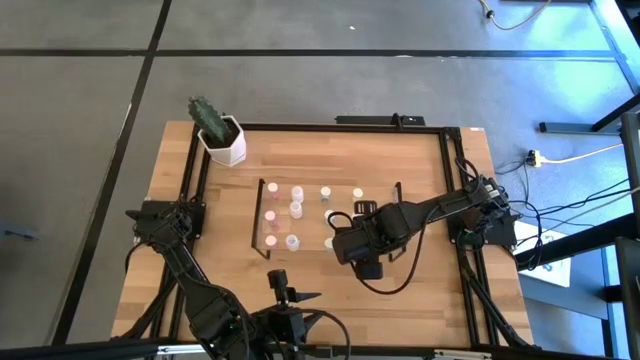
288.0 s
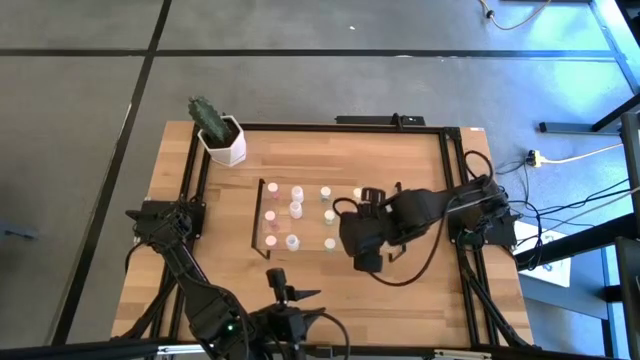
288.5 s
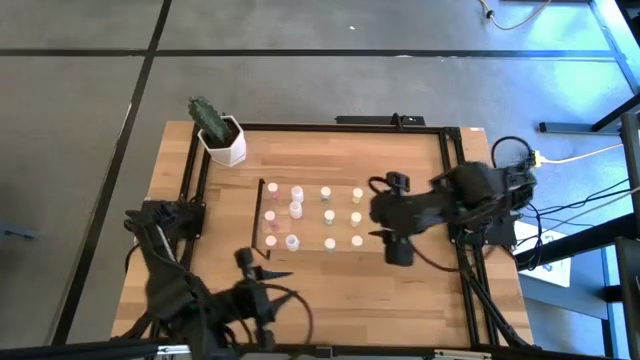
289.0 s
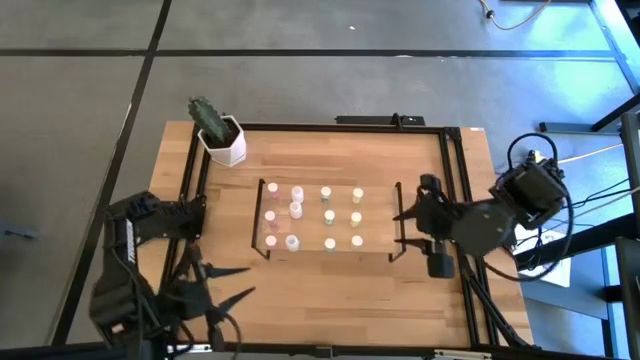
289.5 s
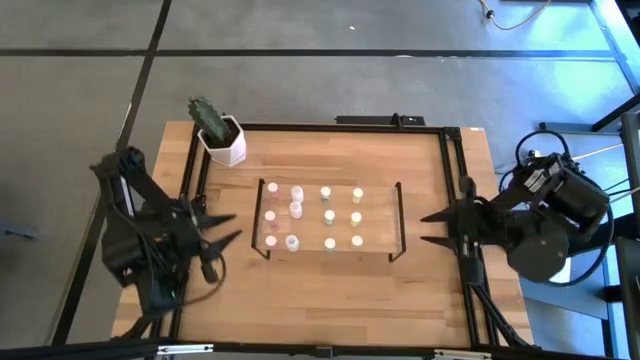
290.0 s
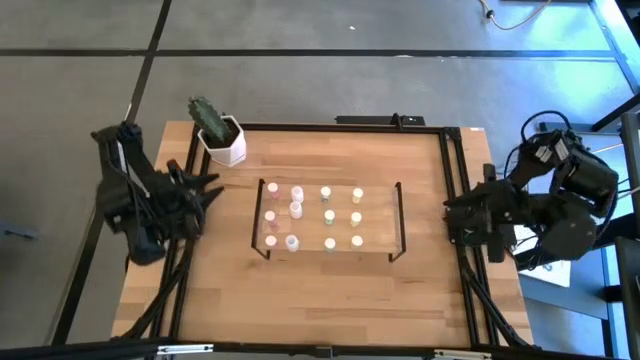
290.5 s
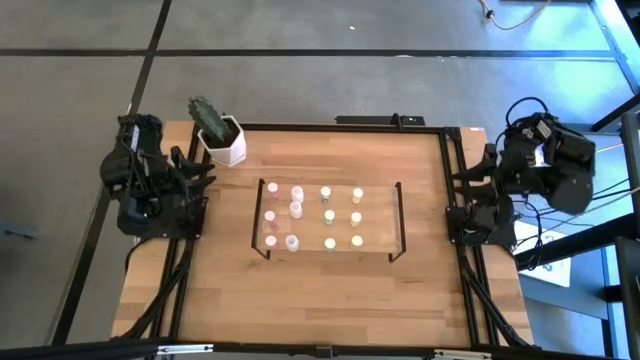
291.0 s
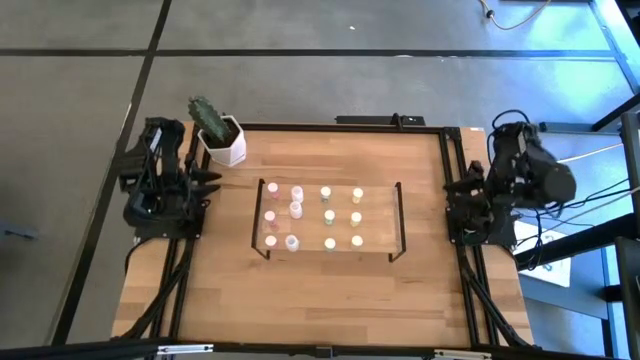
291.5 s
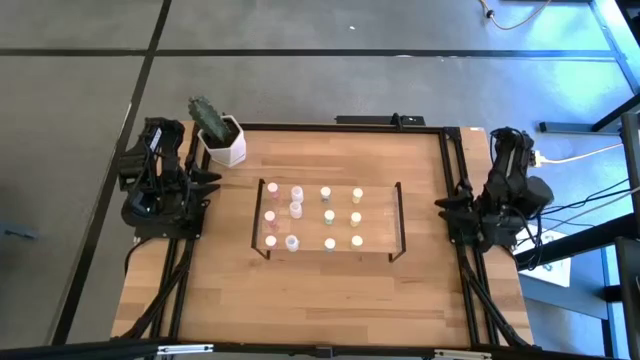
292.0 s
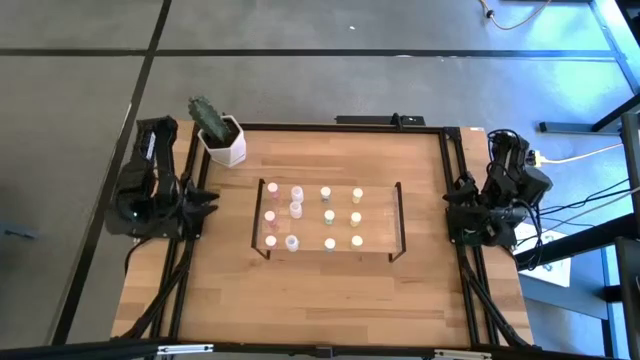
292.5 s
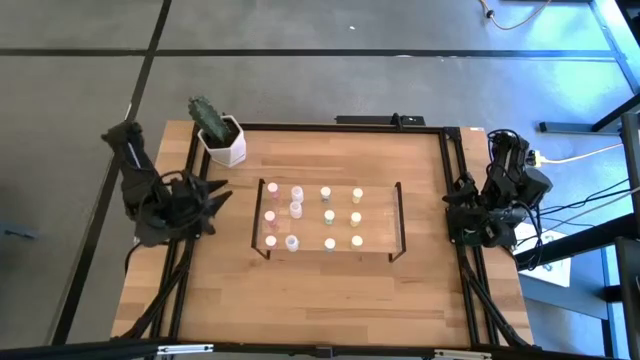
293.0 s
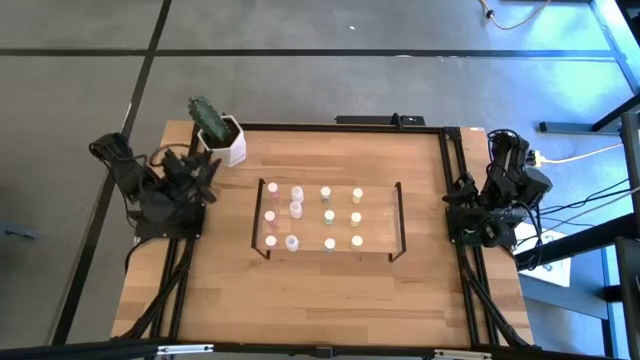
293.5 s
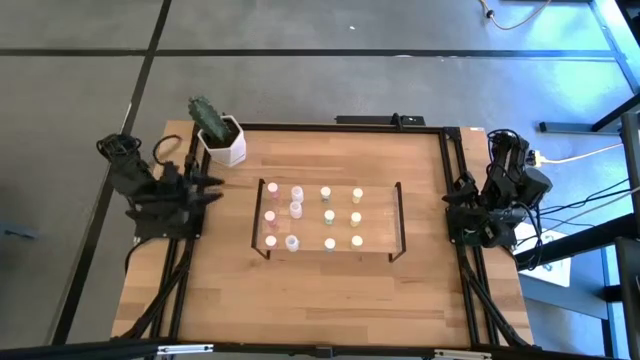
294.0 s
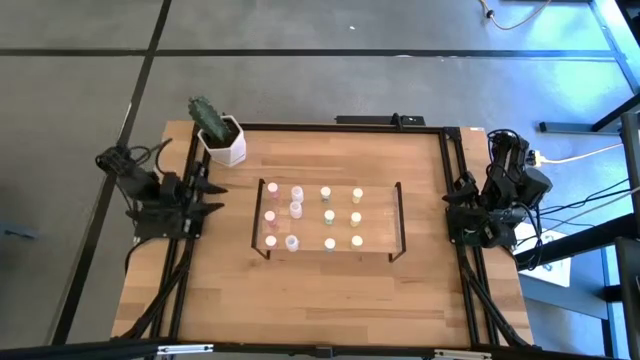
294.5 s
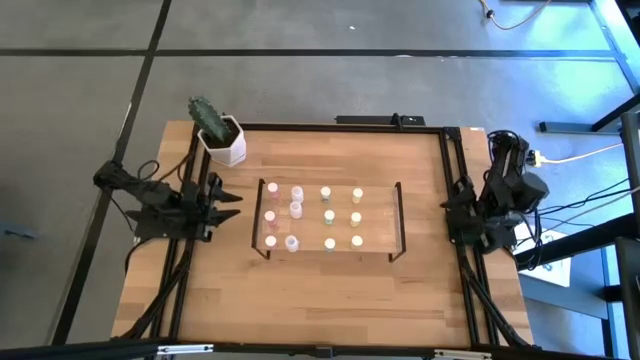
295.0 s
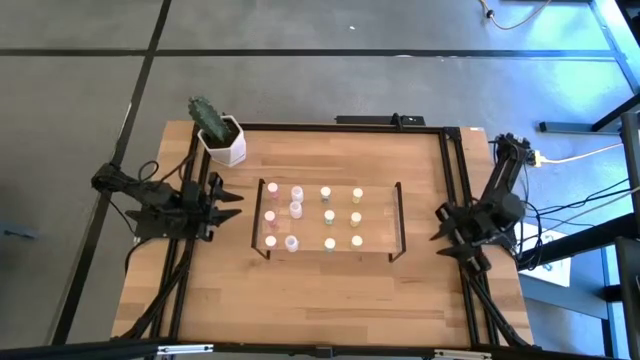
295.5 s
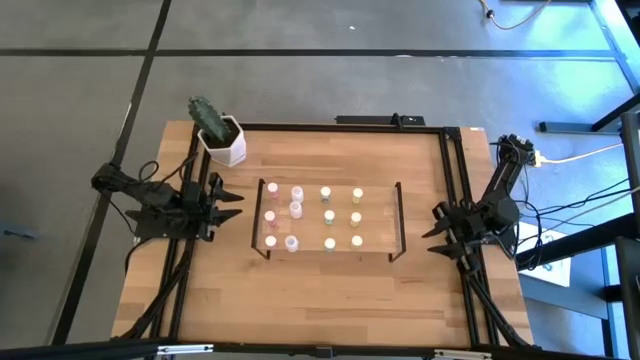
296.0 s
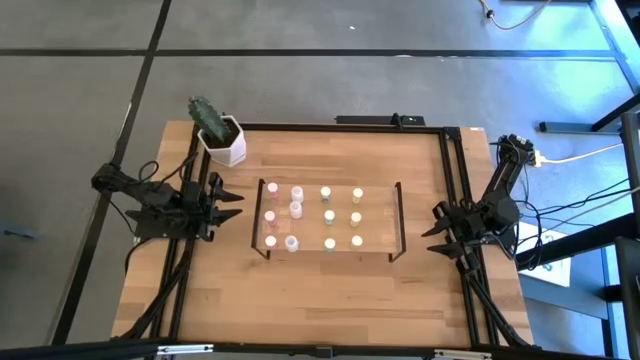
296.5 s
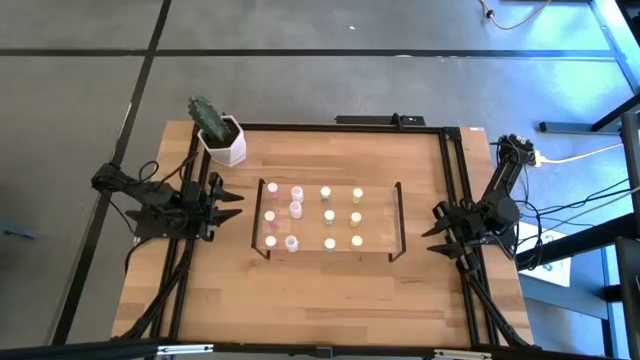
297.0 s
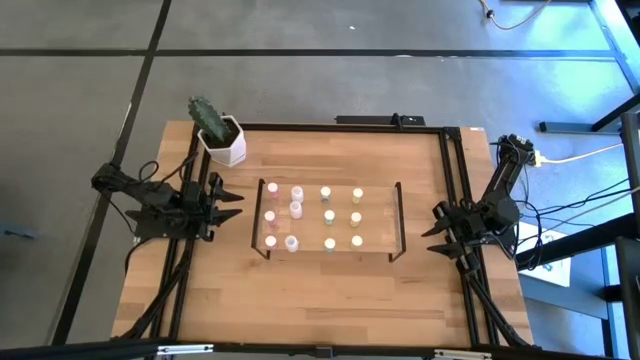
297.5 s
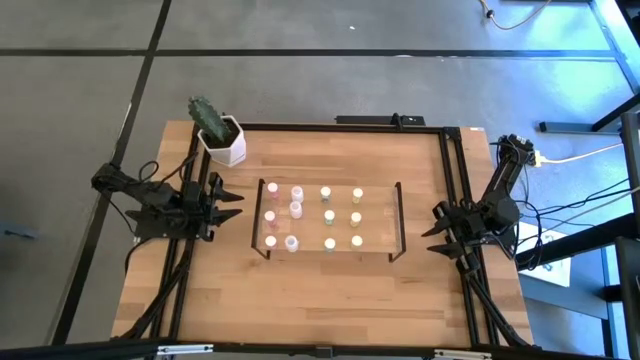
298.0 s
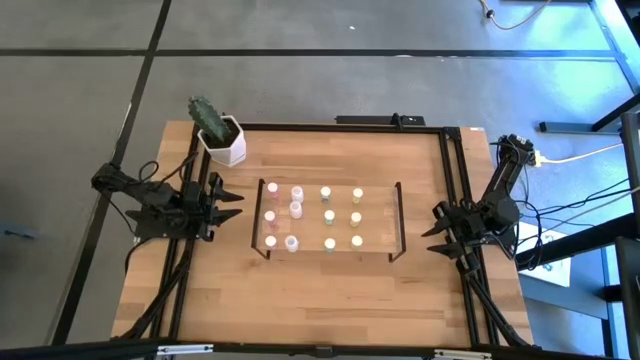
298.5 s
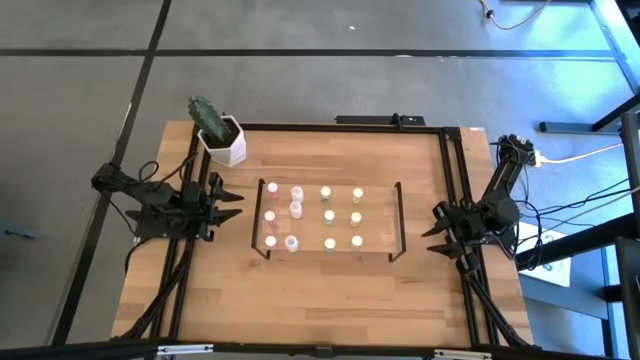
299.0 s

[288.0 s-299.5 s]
Task: Pick and place medicine bottles onto shelf by color
Return to Home Position

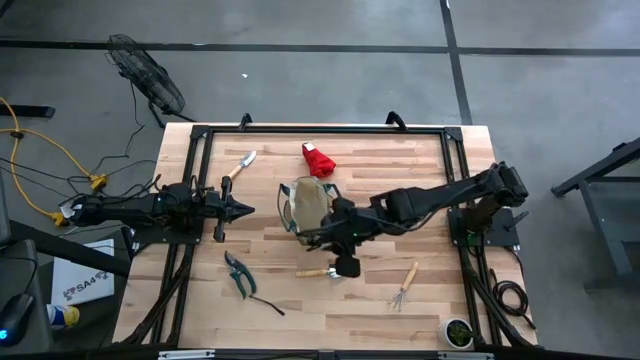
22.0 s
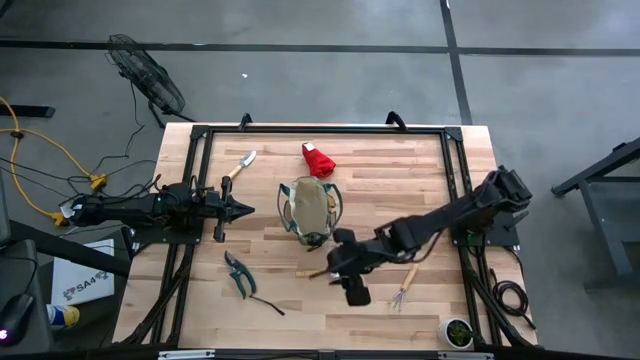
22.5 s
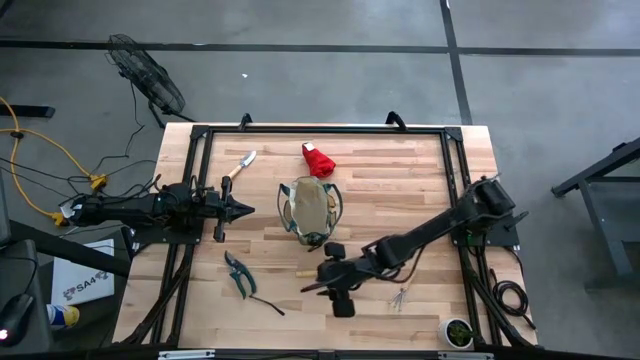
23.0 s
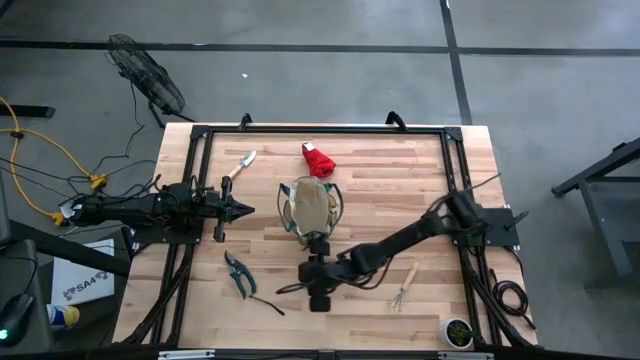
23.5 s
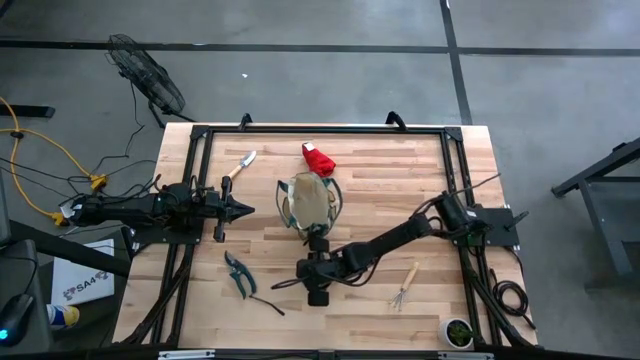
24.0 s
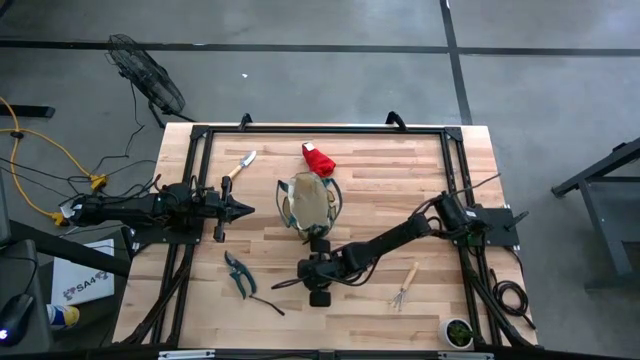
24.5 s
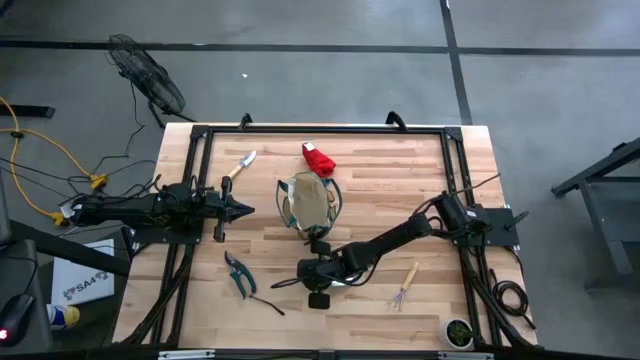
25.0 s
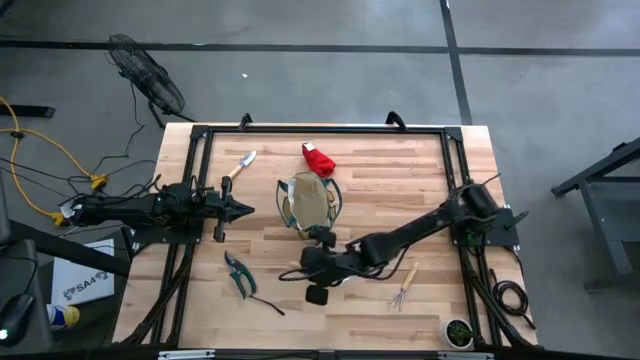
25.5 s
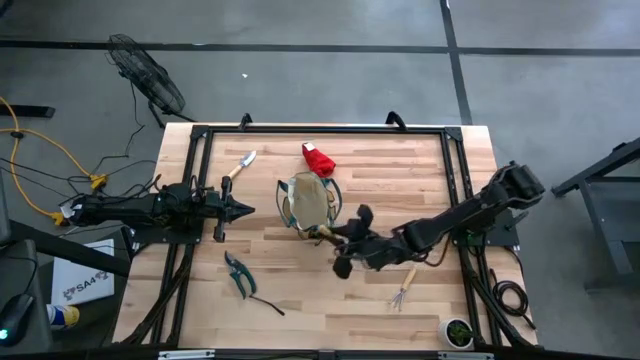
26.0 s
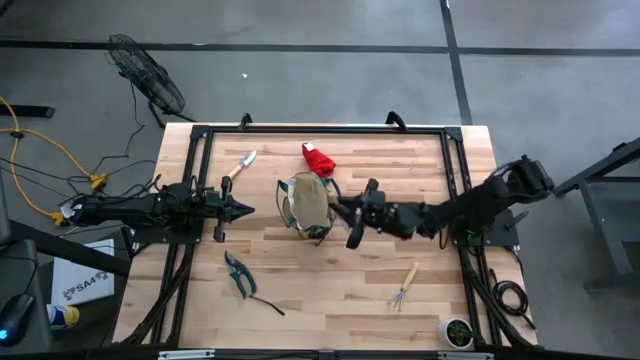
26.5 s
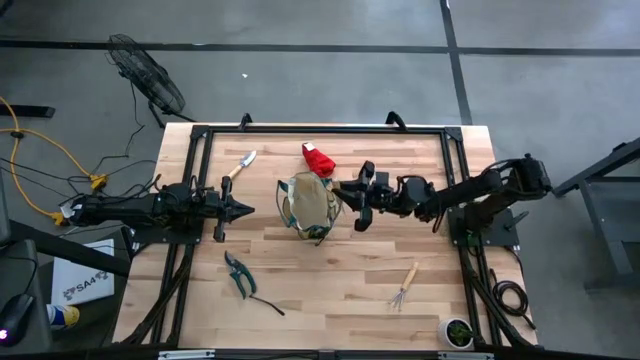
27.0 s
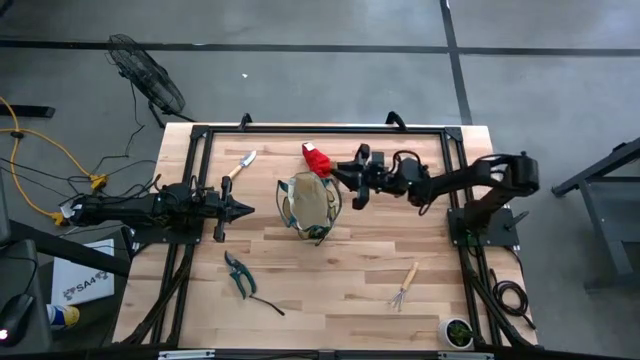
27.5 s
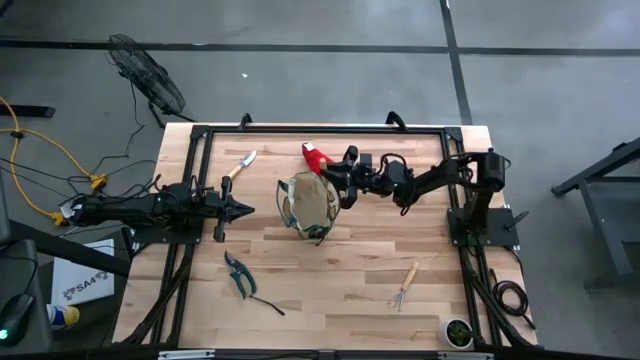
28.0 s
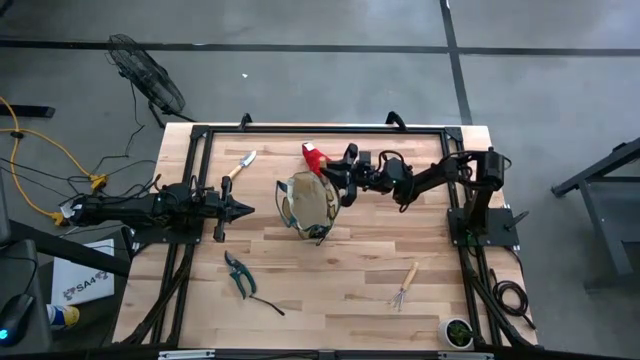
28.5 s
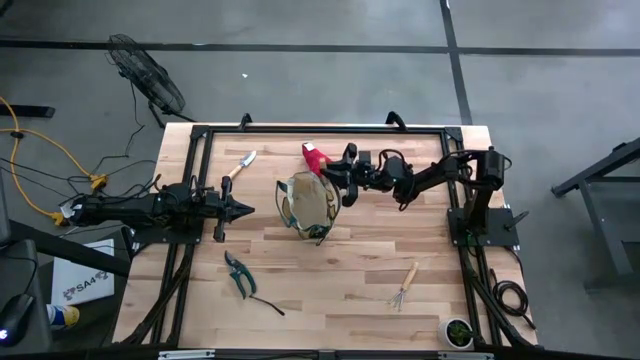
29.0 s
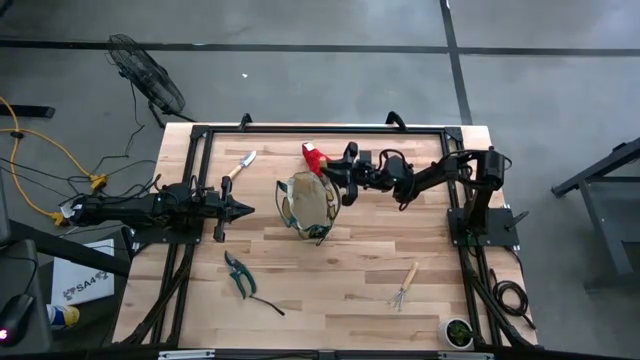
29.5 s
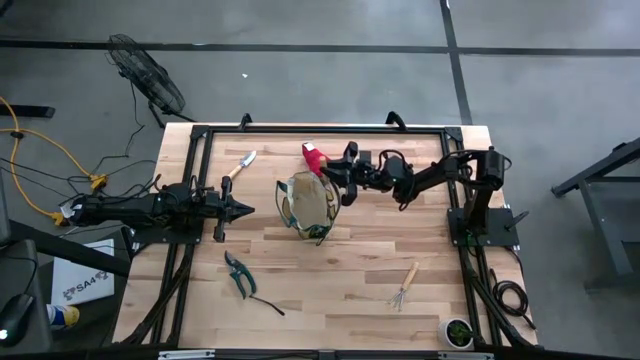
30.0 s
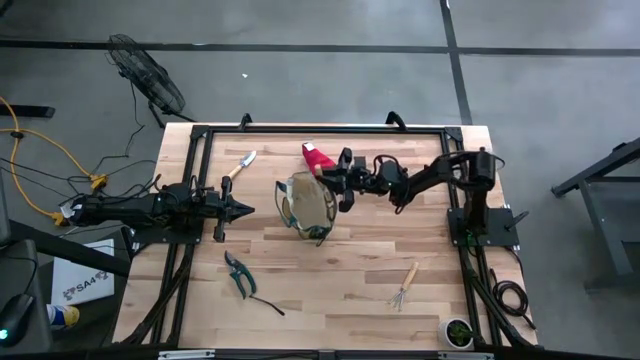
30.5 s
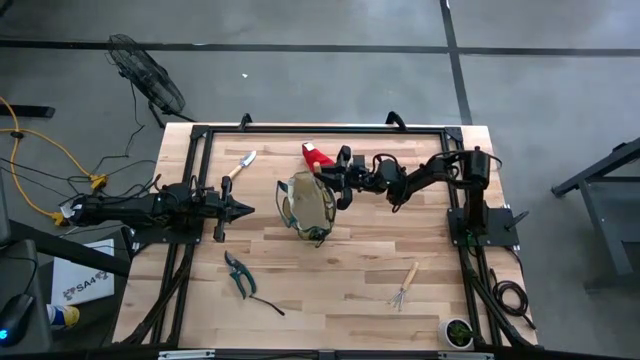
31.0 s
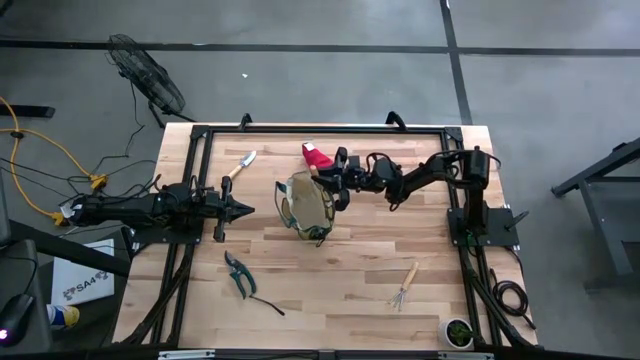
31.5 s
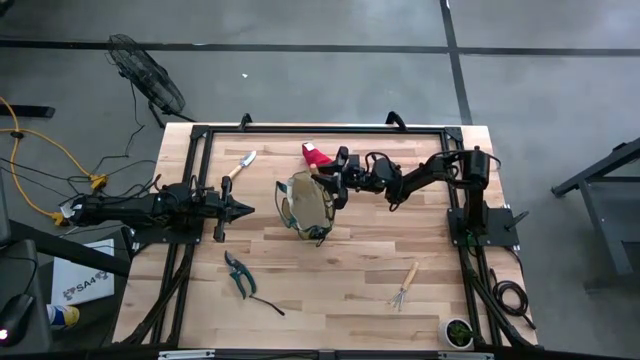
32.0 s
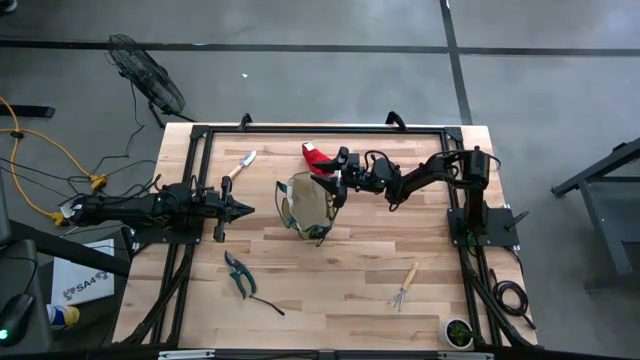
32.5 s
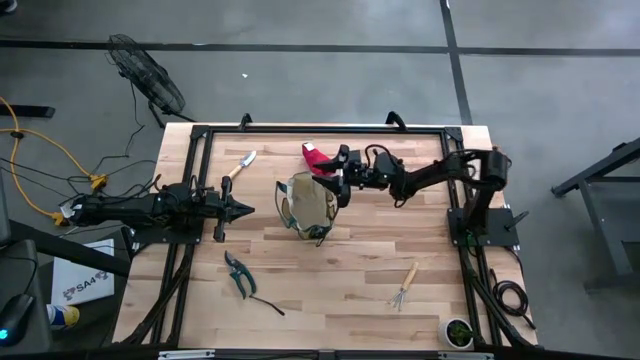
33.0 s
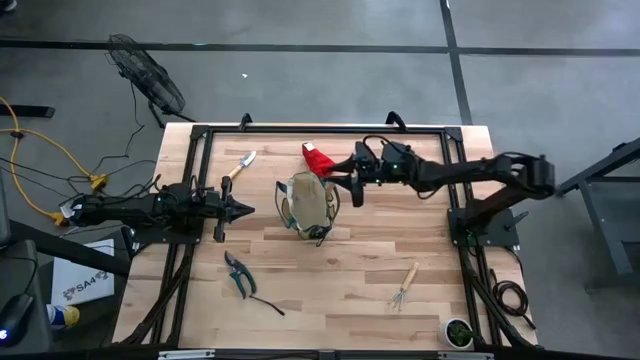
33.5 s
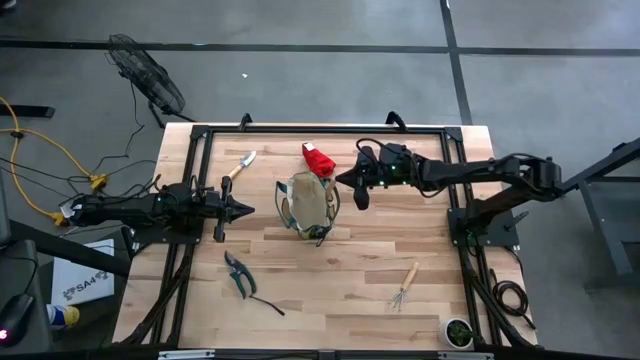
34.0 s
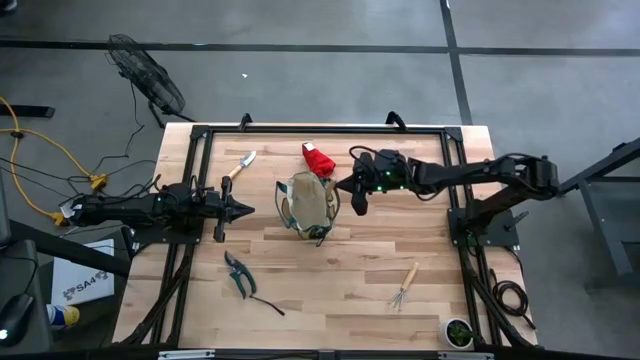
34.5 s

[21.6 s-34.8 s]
Task: Pick & Place Garden tools in Gardening bag
Put the brown trowel into the brown gardening bag
